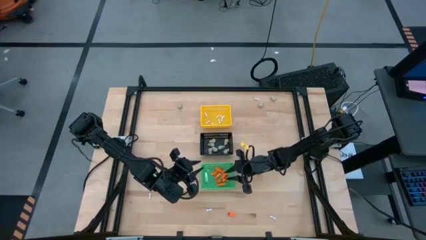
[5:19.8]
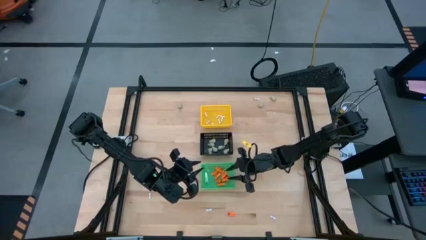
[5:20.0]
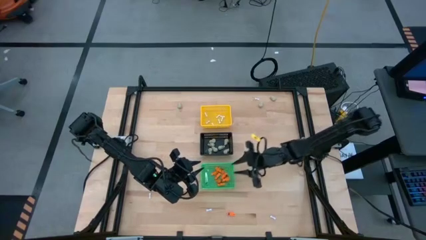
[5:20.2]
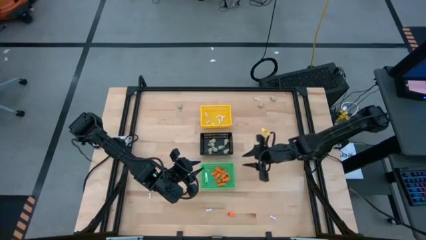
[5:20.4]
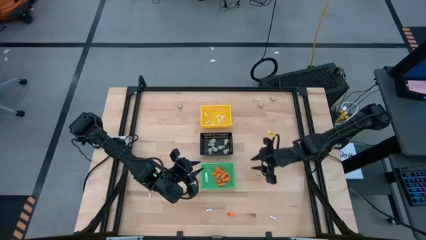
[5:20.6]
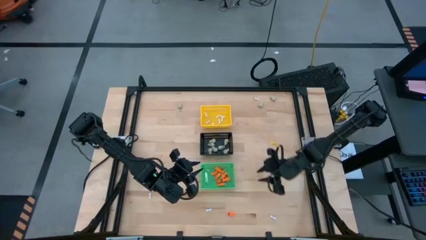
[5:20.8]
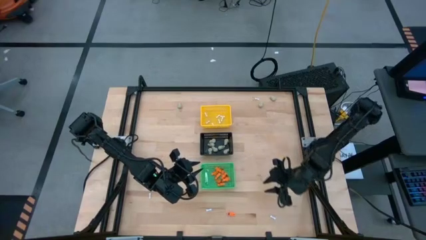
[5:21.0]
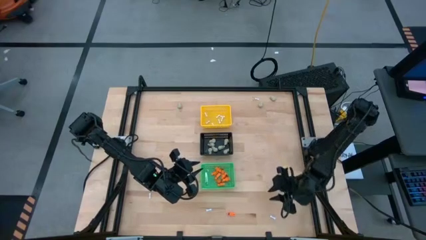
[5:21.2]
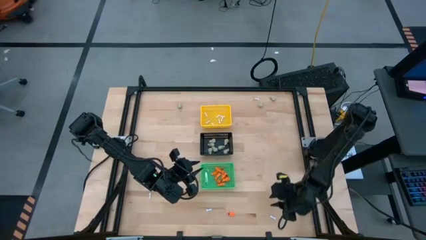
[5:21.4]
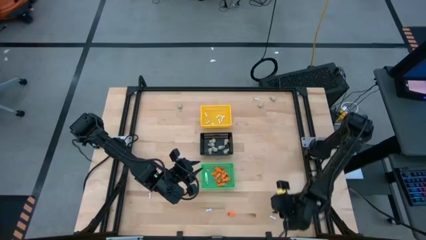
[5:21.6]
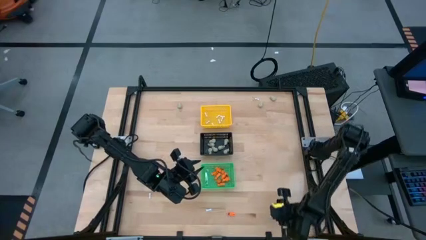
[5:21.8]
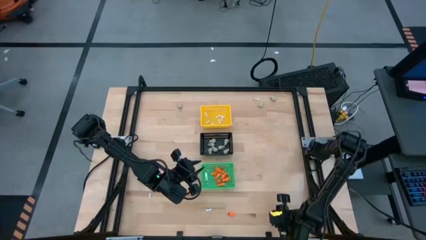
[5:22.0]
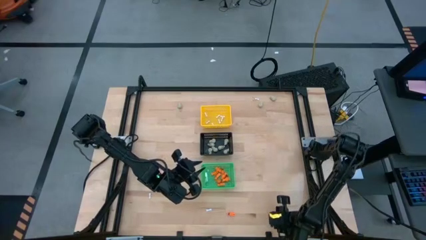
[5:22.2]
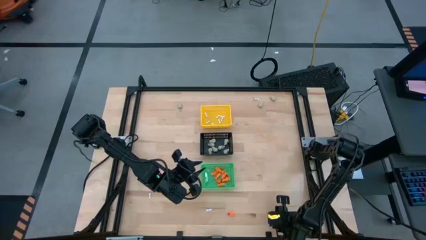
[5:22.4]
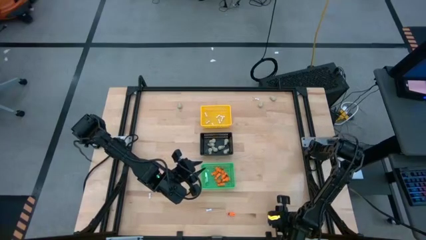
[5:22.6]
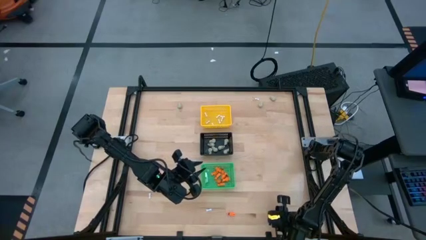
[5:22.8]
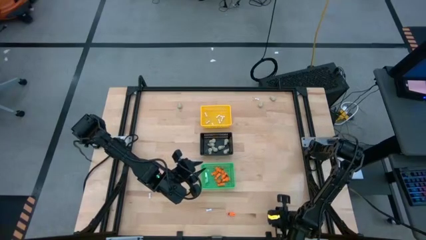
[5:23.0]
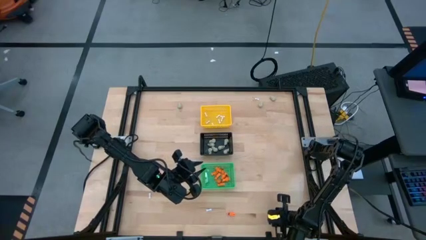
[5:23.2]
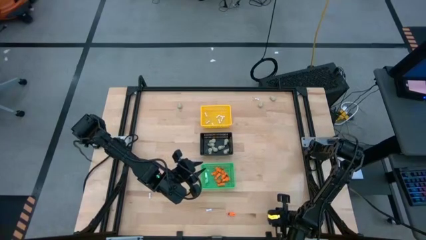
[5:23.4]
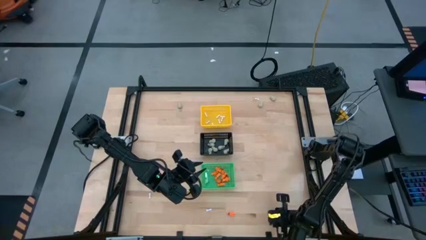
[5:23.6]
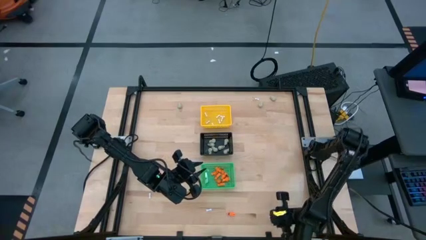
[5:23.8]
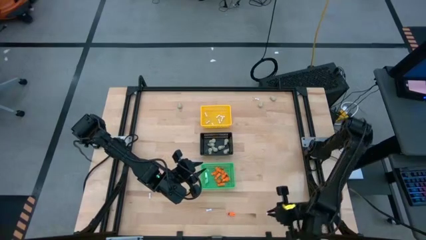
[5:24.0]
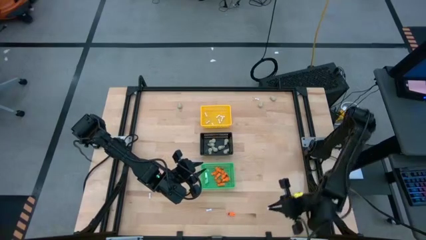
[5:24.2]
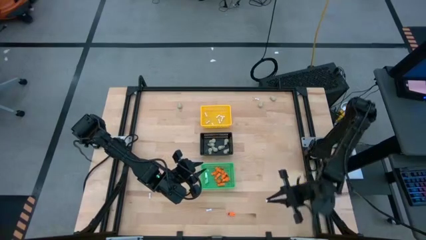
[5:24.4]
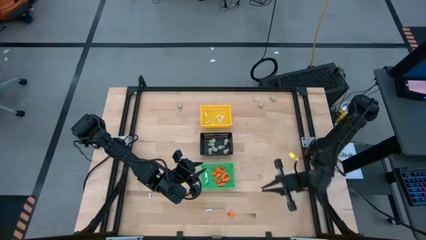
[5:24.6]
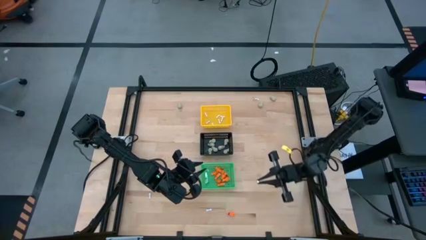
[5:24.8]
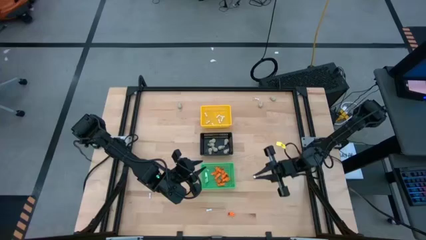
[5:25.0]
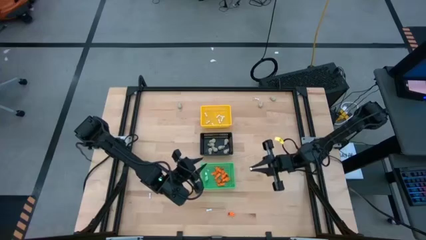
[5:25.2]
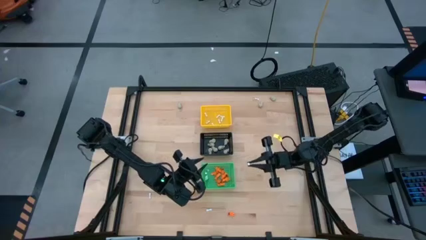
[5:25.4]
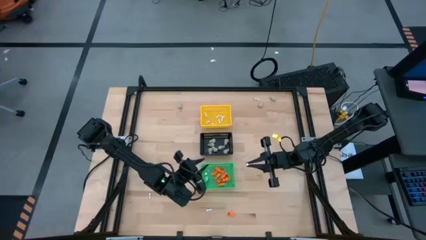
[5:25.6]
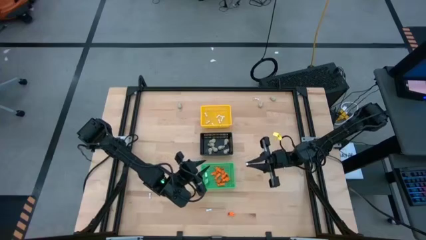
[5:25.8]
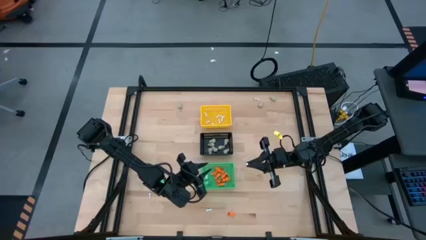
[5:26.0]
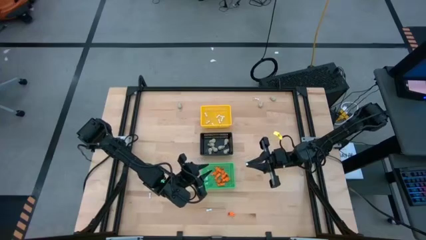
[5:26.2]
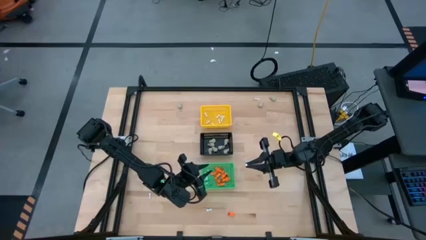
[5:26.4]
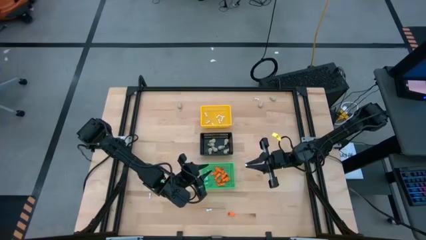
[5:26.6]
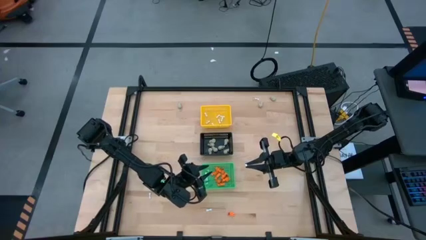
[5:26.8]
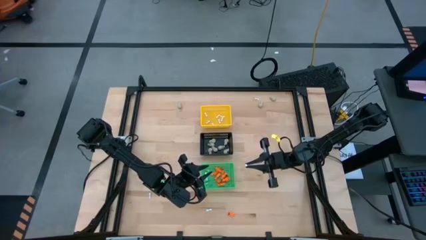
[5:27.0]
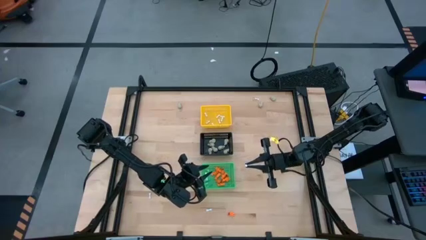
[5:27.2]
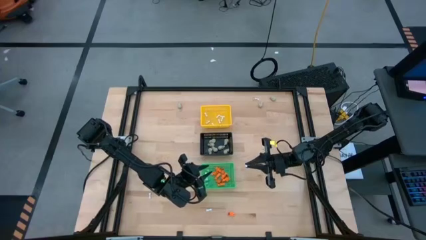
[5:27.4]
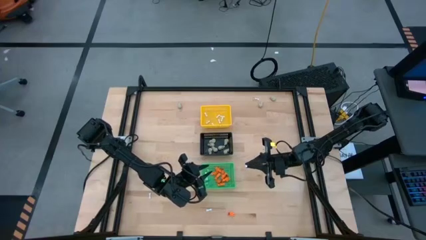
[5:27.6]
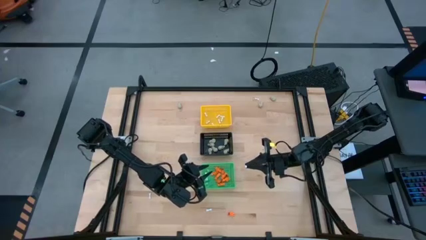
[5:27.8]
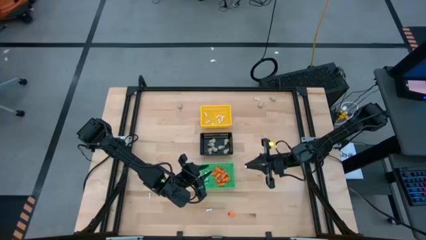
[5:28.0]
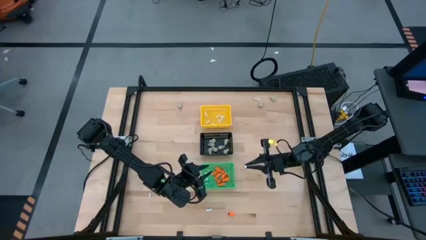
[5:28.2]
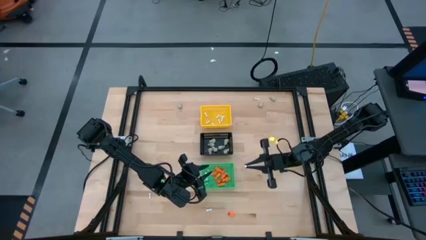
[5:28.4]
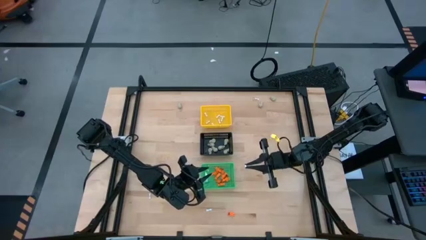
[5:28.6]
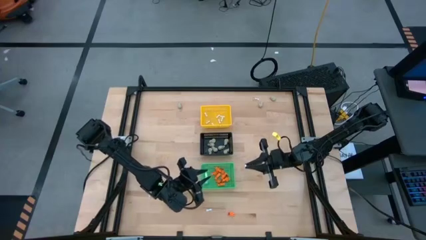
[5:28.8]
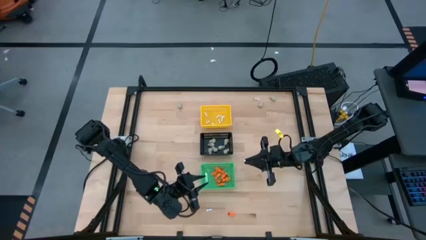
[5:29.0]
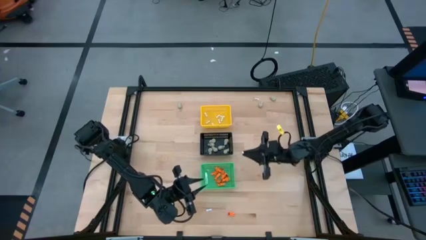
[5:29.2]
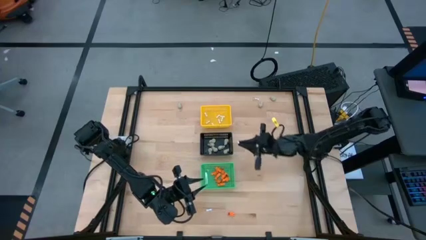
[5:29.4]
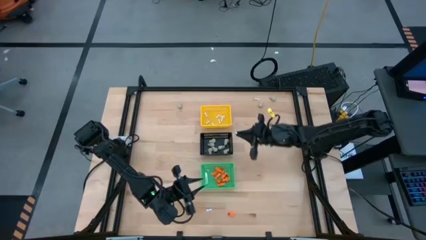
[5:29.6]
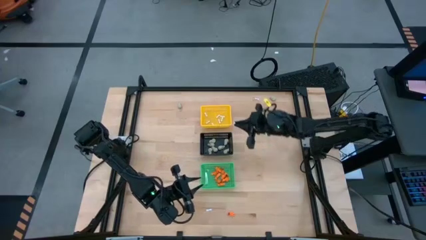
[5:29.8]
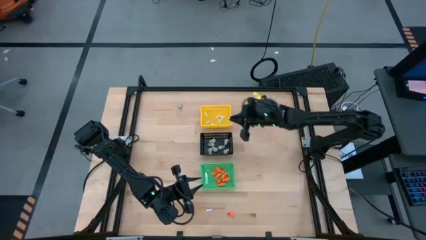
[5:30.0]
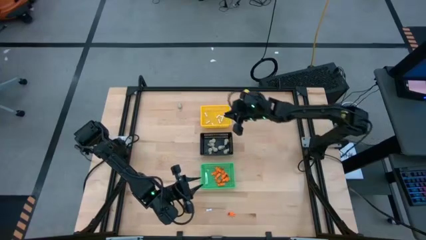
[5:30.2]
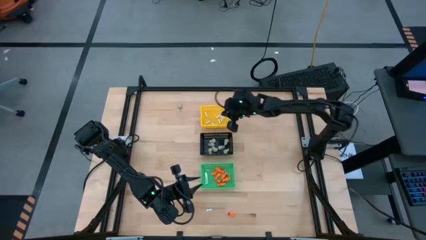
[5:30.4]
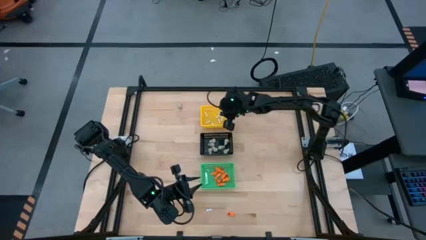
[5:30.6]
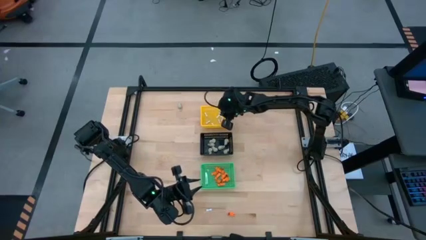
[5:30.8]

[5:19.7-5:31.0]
Task: Sort Halloween decoration
Put the white bone toy into the yellow basket

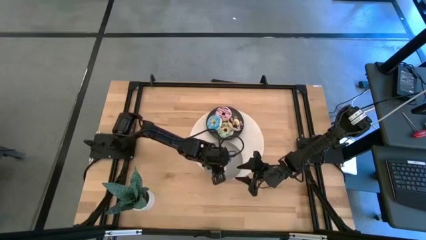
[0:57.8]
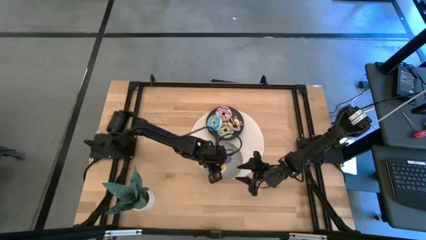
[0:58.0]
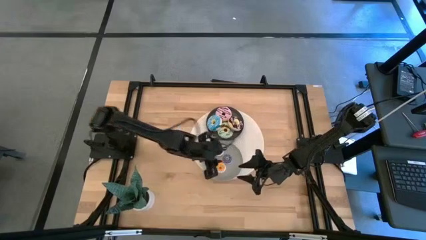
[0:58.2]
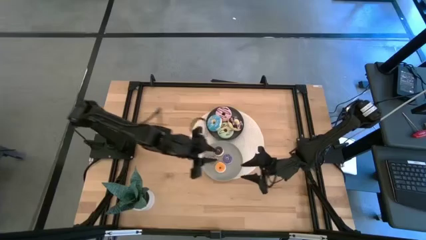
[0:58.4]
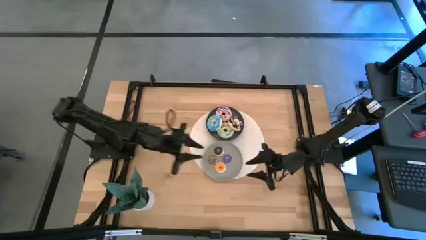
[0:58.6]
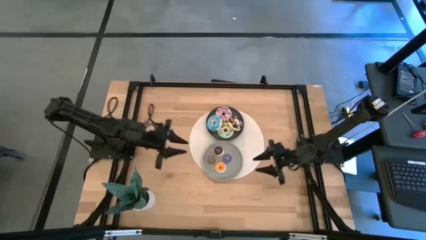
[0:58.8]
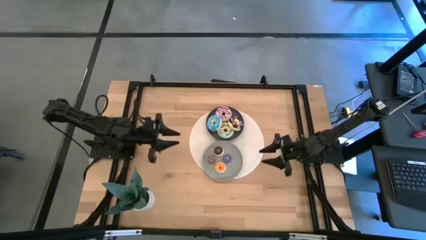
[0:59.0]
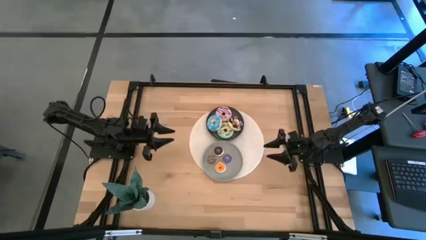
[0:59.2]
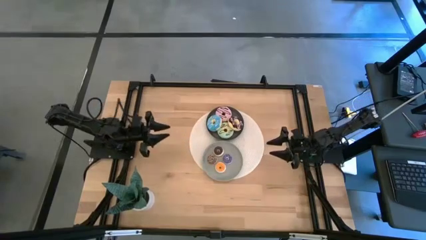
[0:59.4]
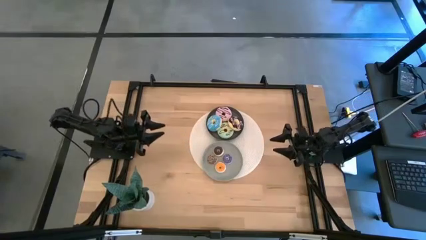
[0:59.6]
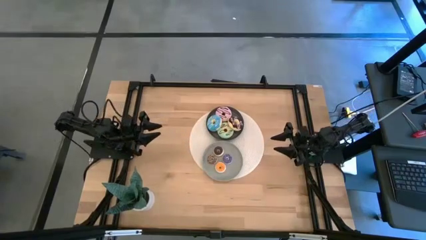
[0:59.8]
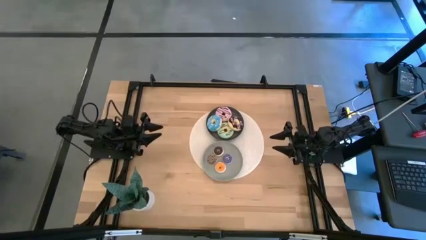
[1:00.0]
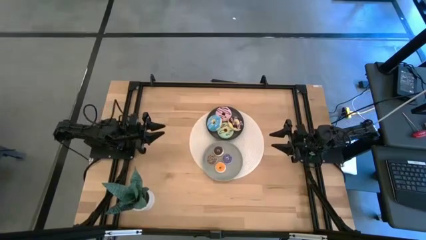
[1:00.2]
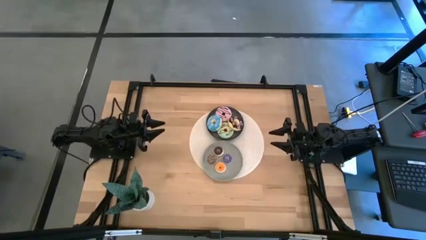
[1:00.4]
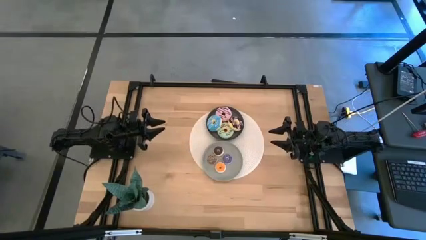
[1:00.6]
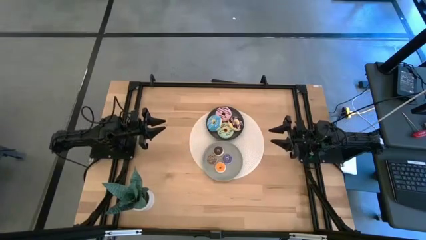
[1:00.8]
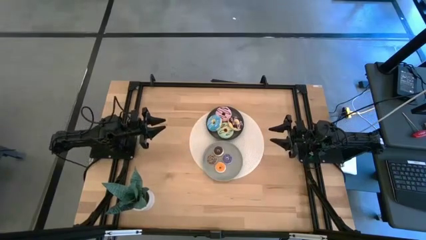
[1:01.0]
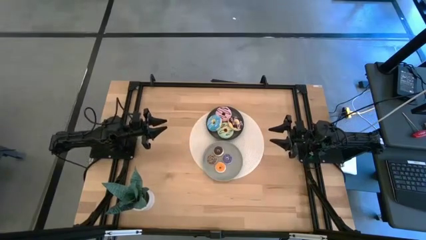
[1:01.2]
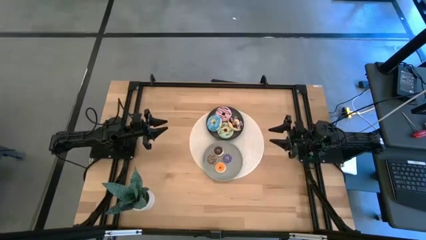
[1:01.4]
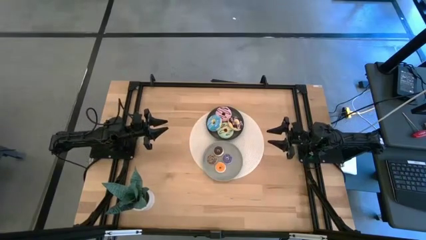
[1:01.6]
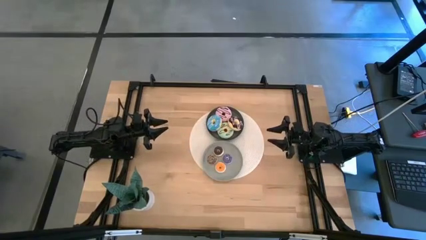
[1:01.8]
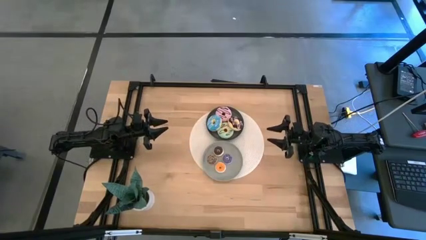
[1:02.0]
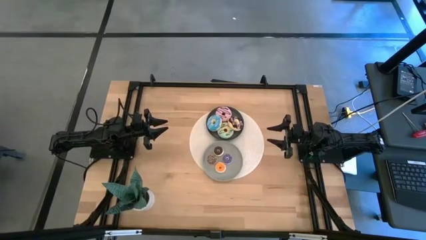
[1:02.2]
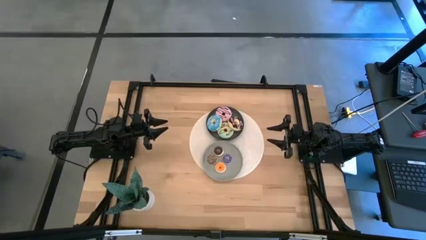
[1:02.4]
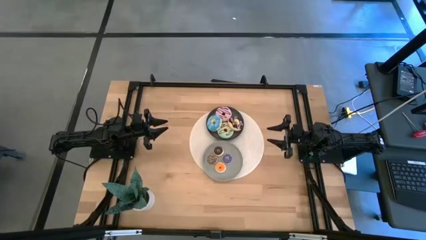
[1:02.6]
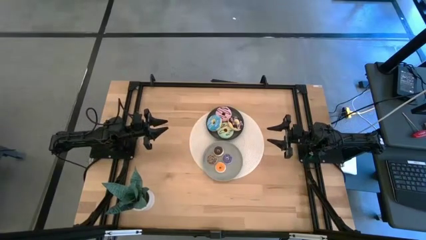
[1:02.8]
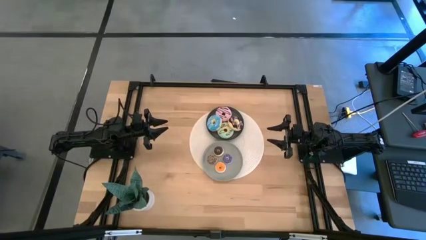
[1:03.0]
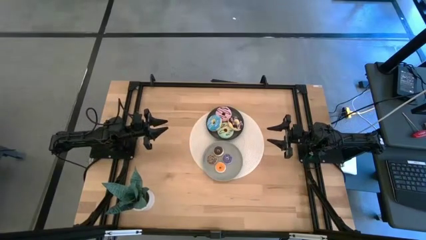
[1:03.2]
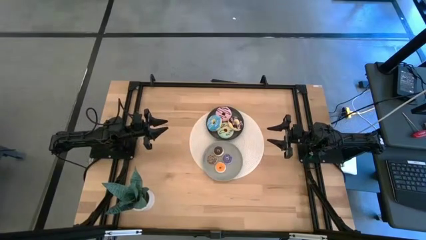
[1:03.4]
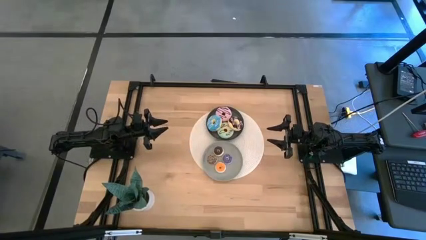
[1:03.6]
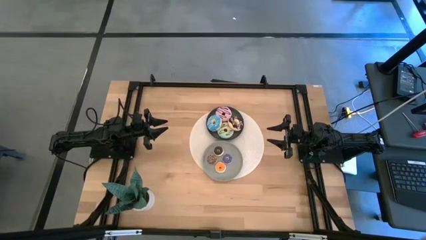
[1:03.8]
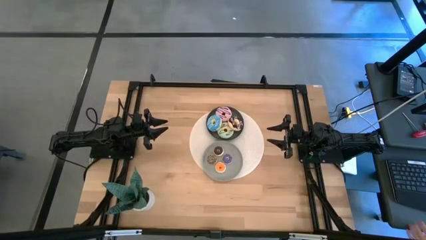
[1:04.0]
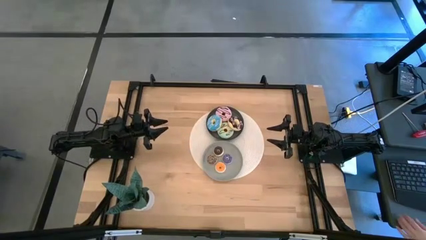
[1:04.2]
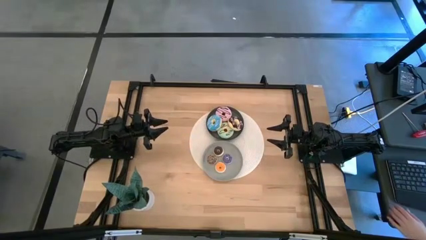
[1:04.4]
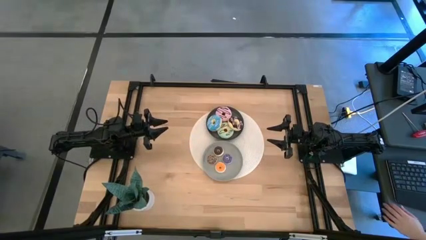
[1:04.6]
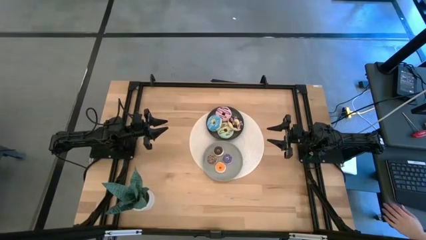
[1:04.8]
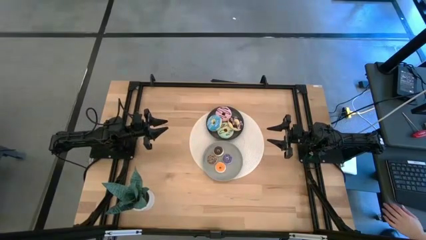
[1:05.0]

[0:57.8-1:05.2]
Task: Pick & Place donuts
Return to Home Position
